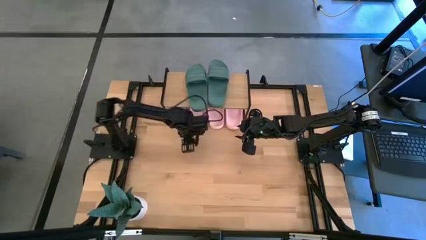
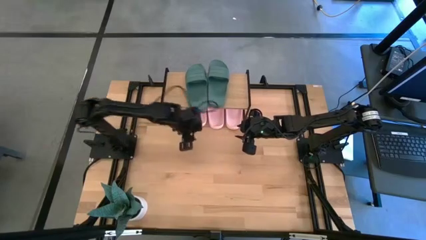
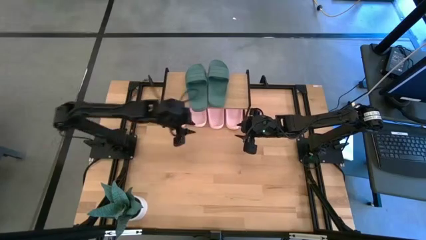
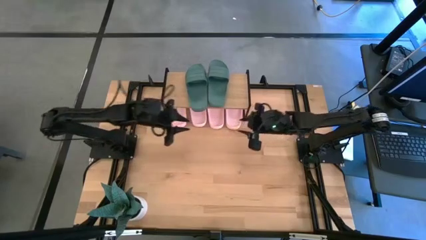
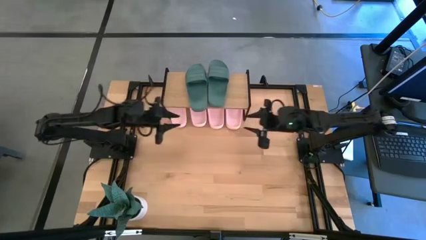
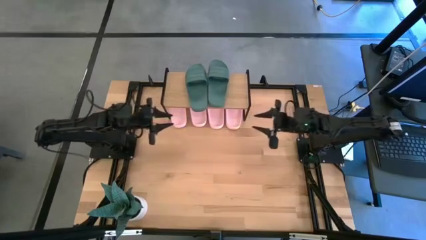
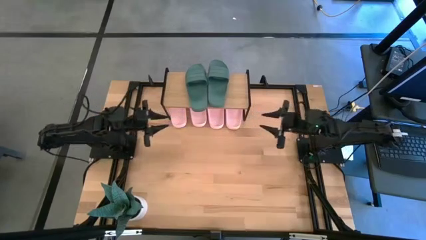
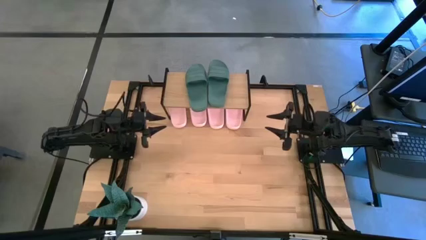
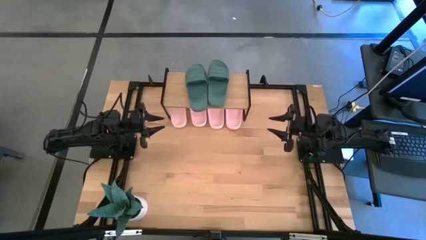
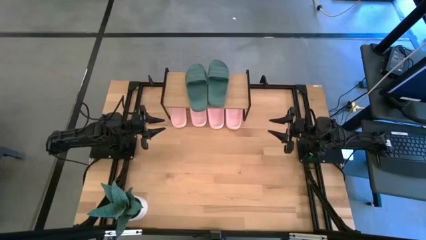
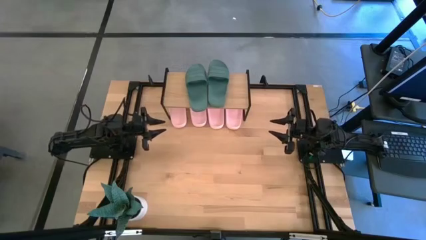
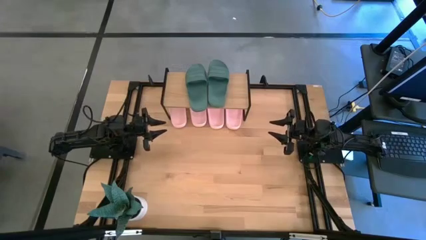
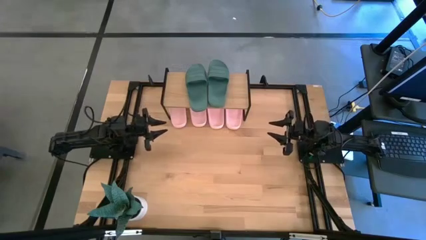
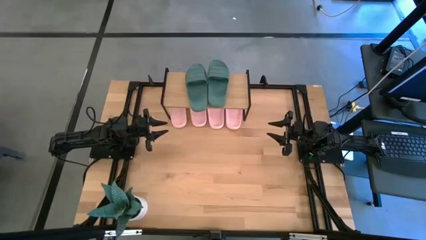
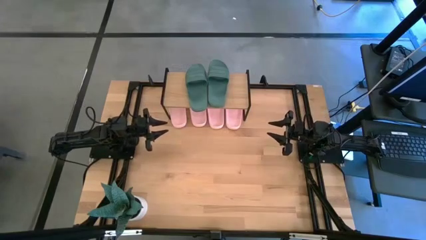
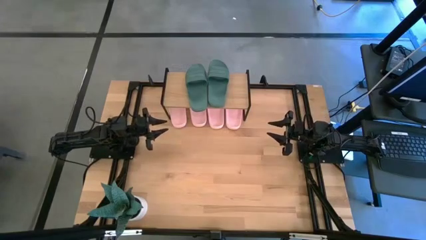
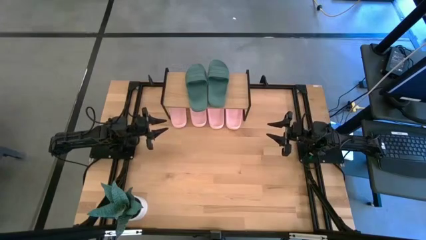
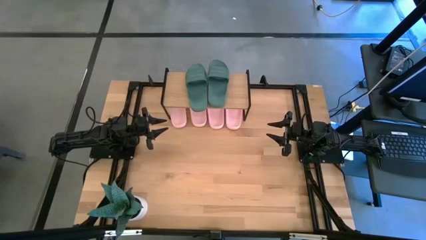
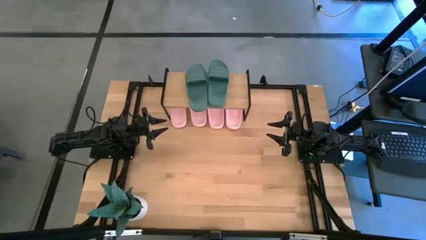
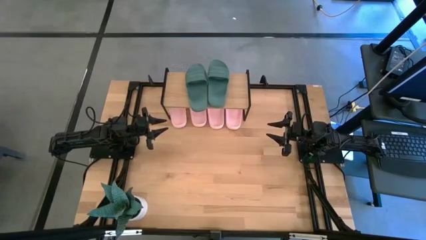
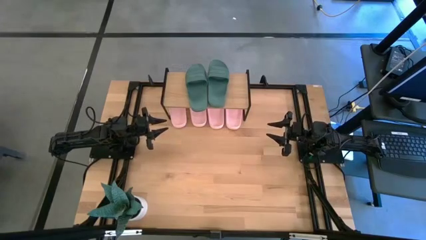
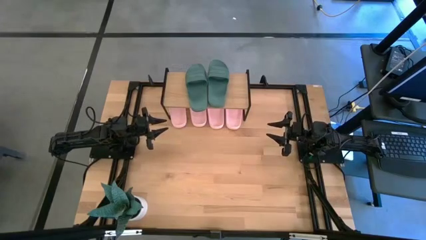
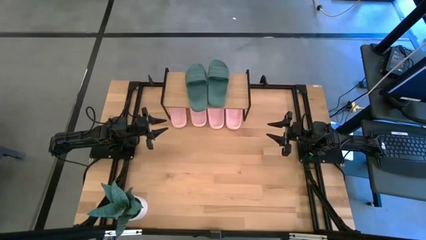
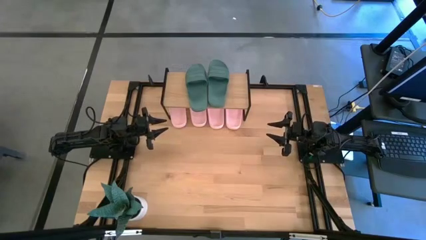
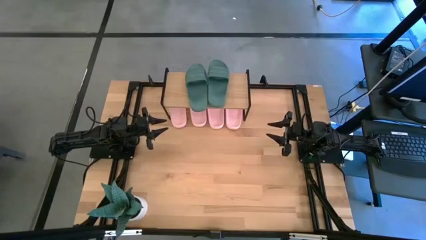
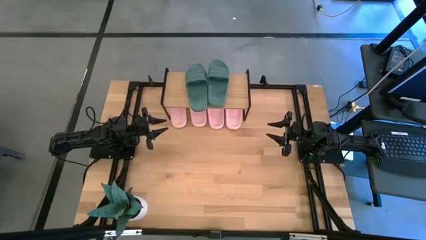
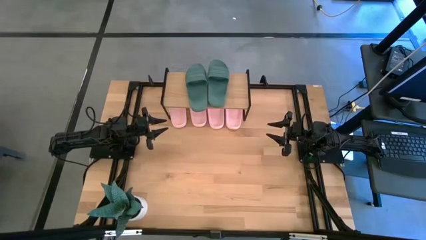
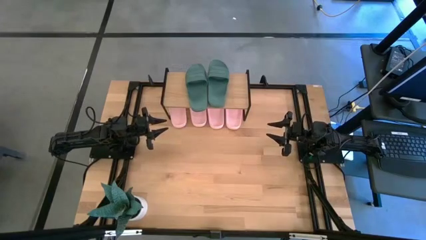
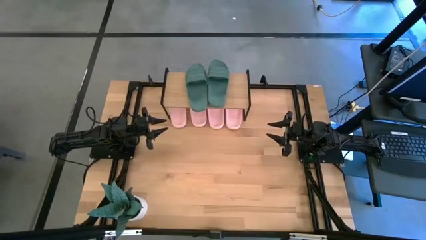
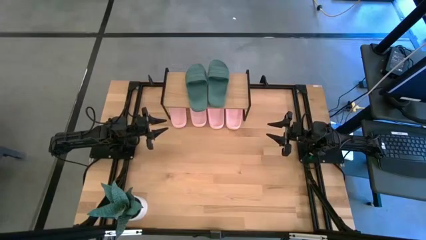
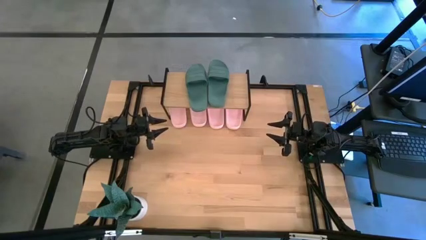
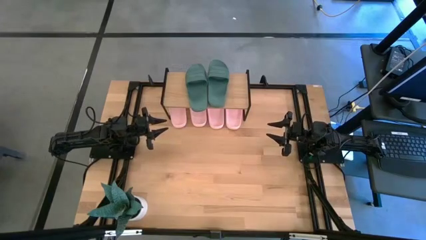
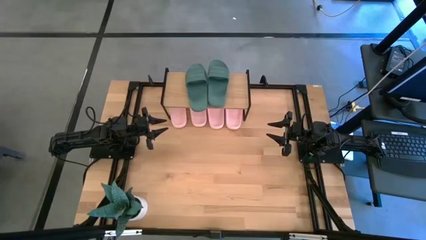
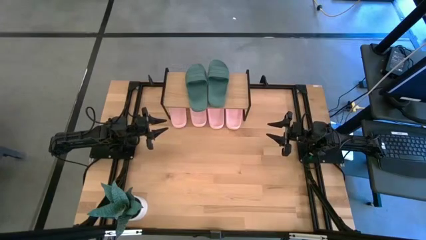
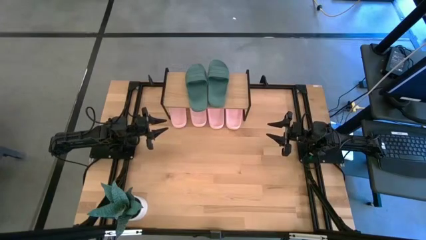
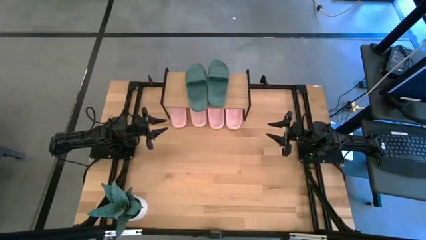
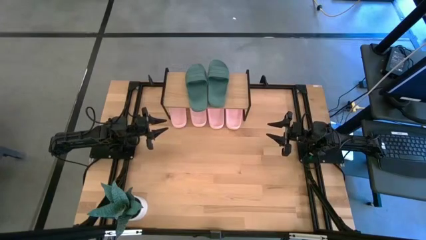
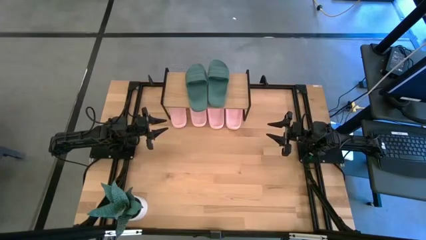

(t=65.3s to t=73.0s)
Task: Pick and place slides into the shelf
Return to Home Position

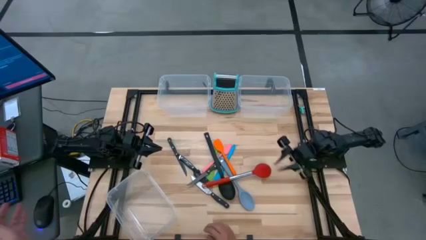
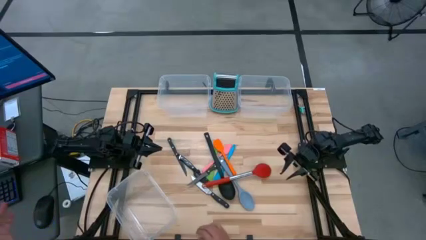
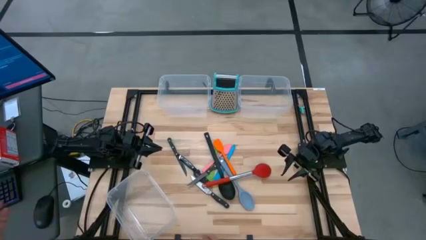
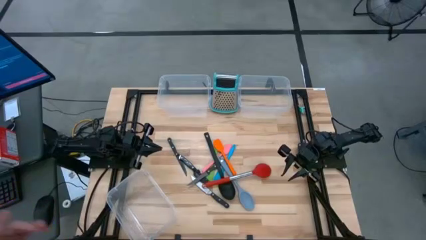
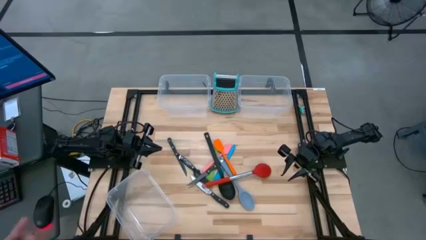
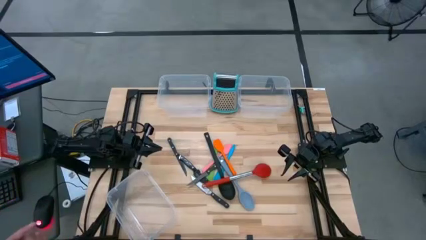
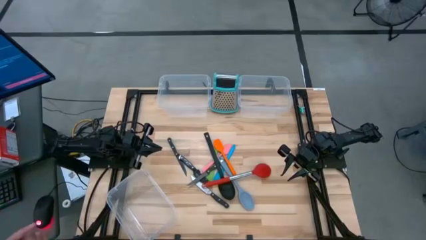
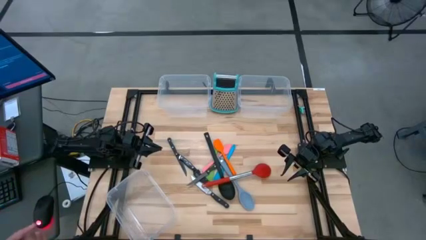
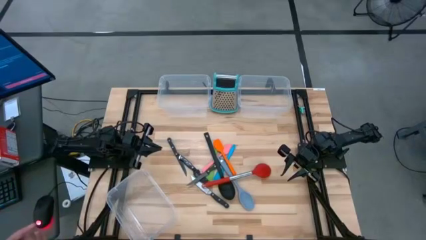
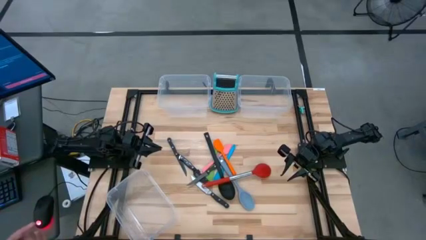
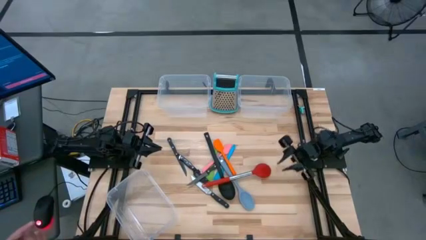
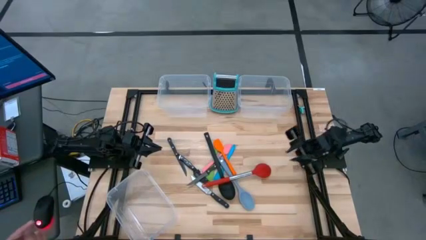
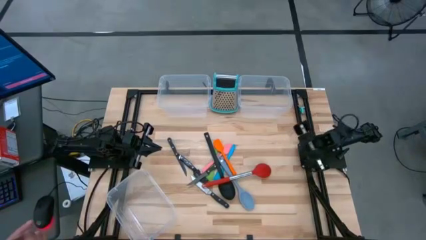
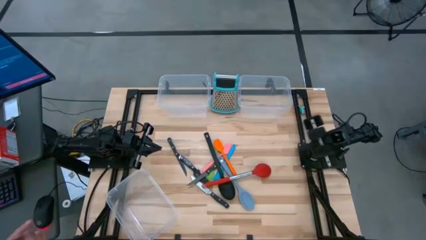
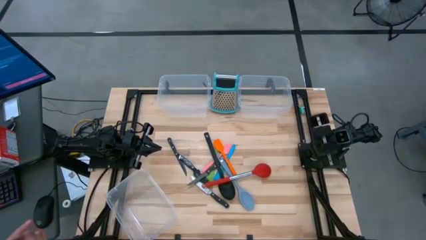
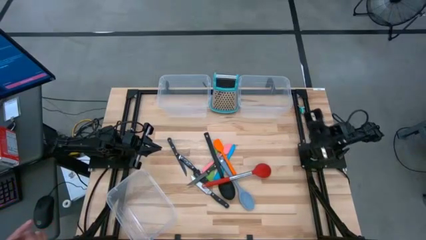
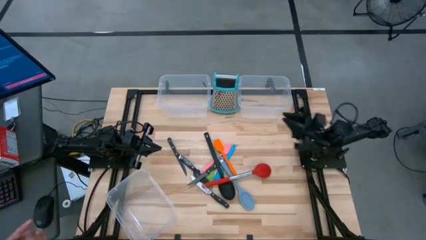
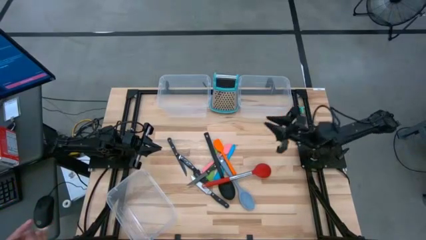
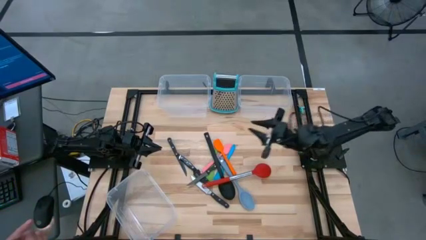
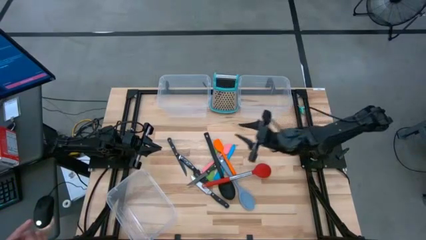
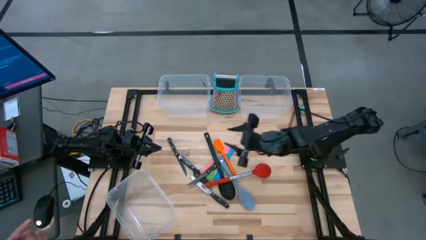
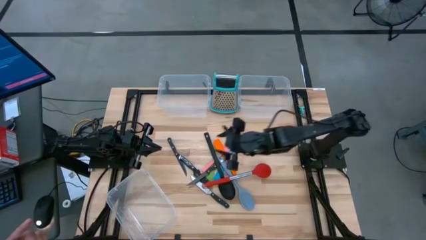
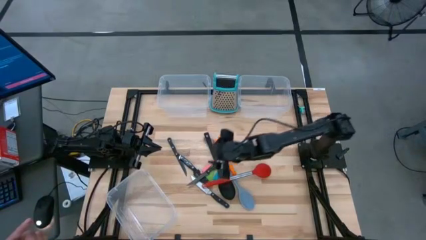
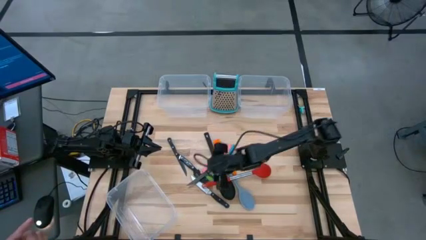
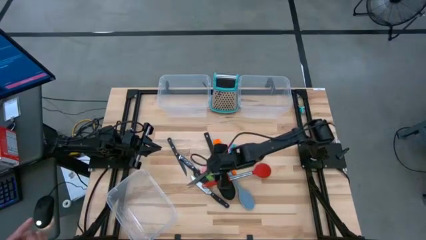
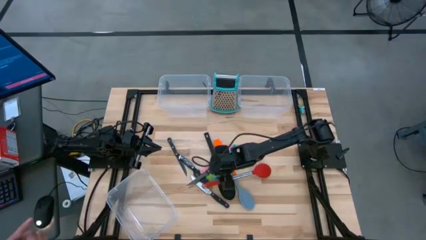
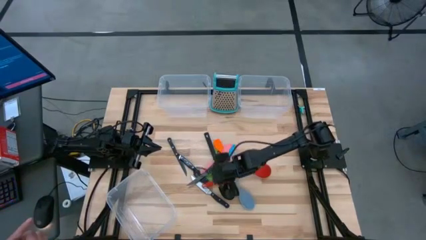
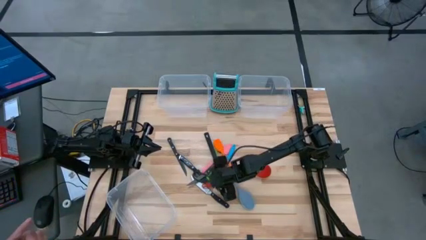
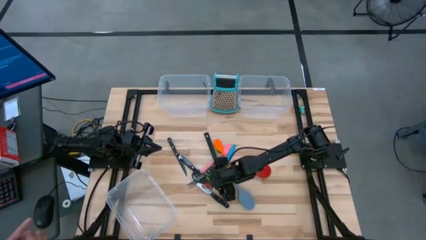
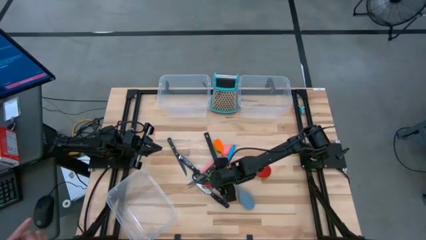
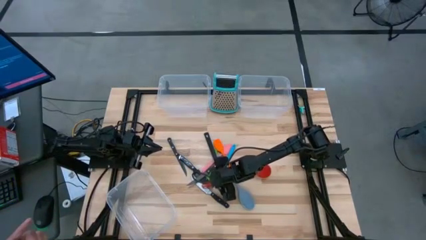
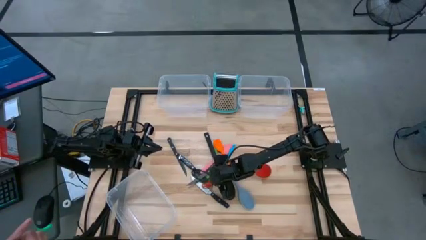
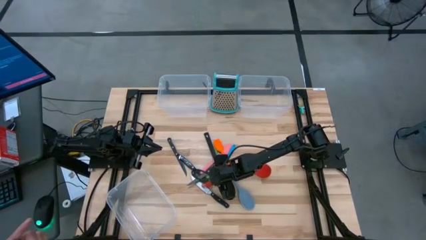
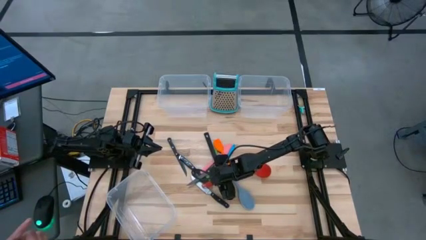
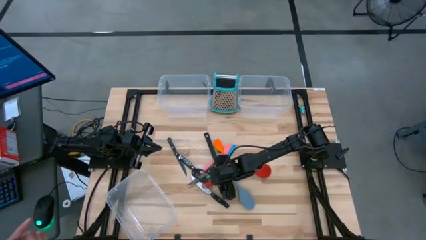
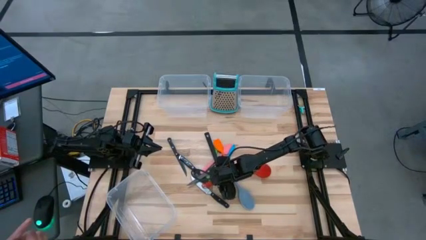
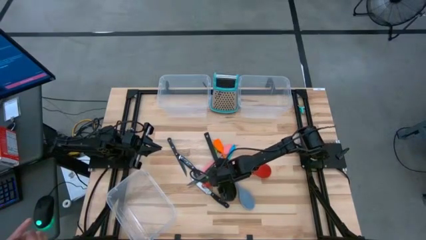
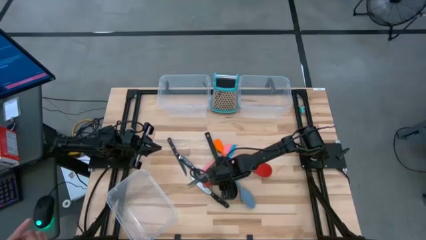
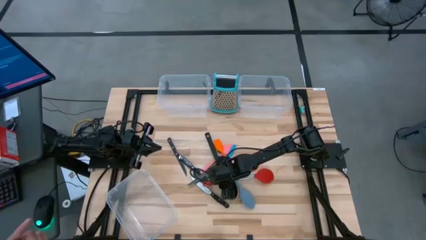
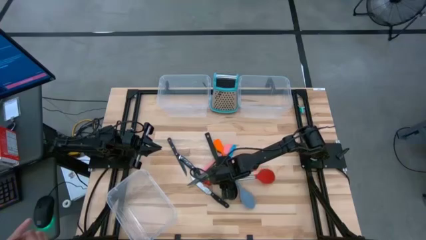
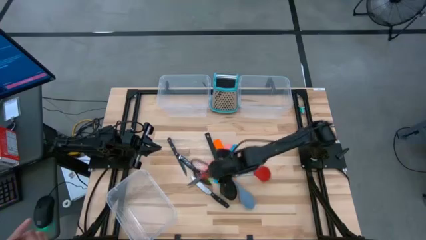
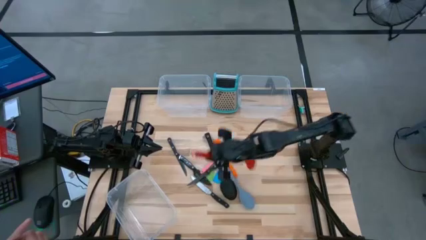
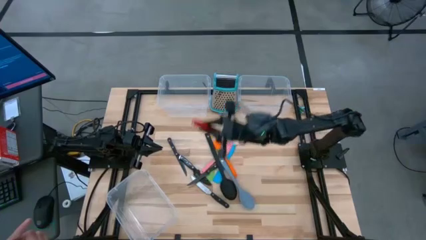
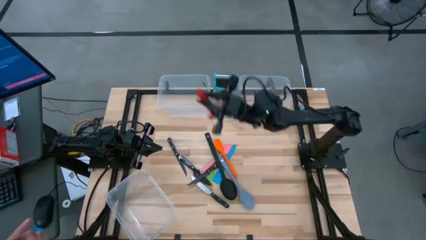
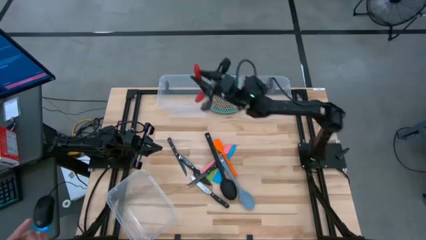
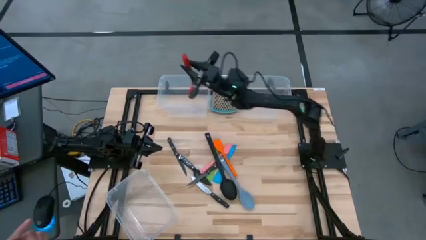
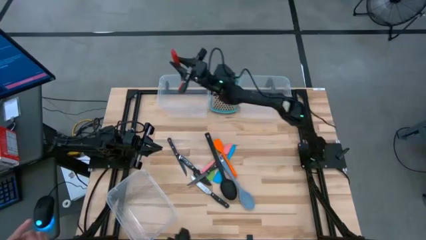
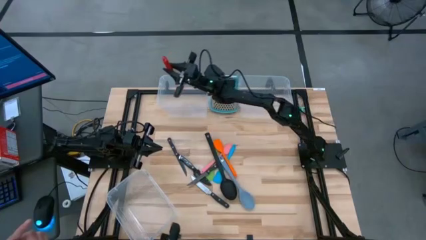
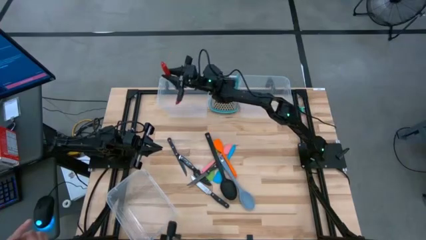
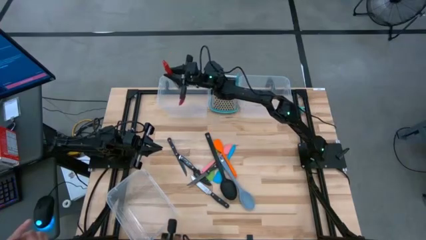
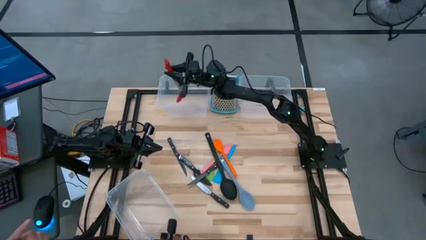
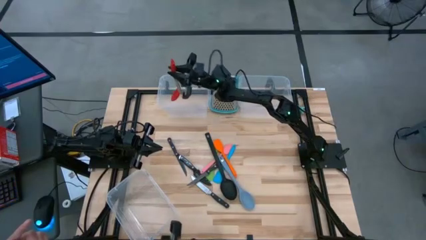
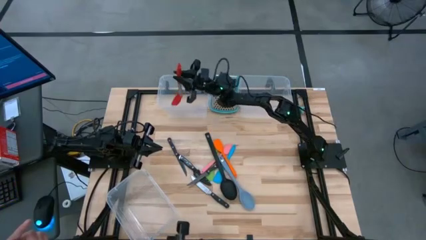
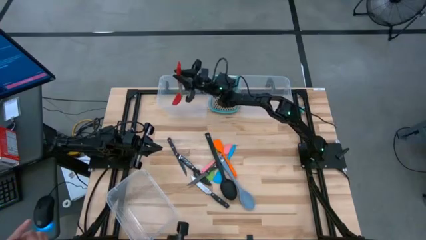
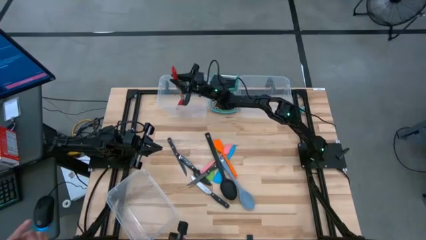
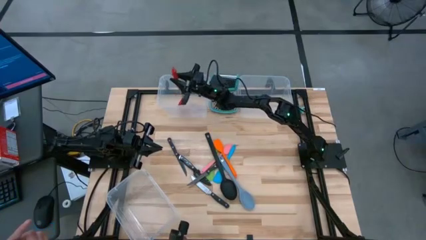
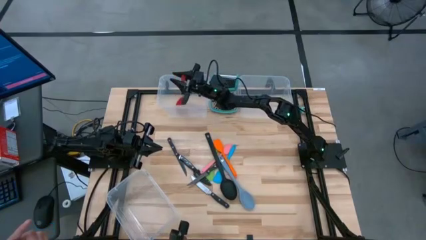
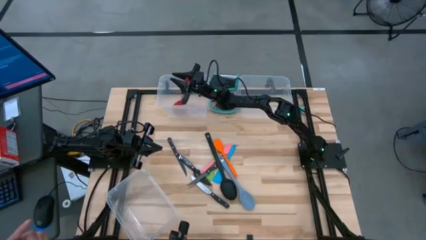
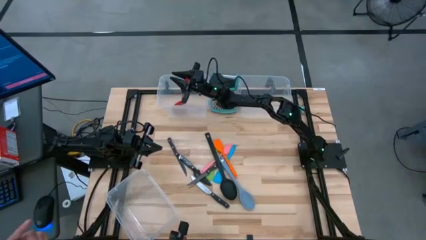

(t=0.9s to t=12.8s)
Task: Pick & Place Kitchen Items
Put the red serving spoon into the top left transparent bin
